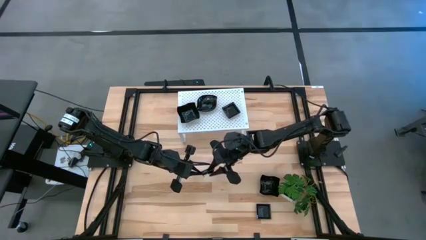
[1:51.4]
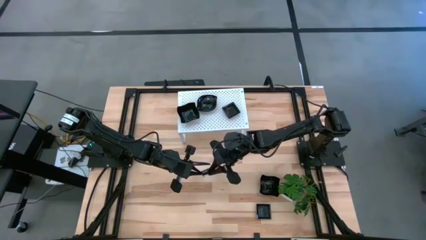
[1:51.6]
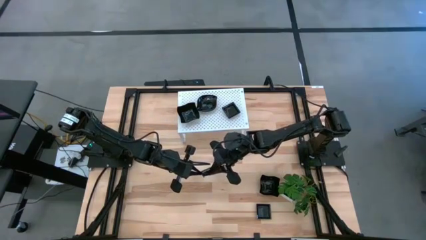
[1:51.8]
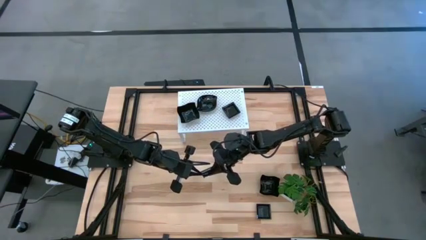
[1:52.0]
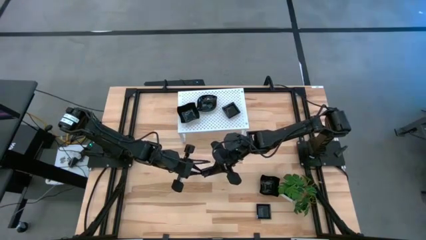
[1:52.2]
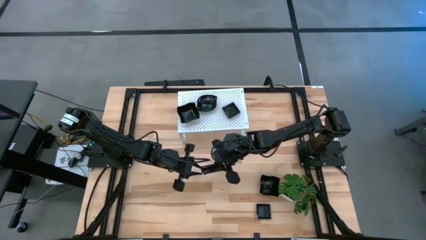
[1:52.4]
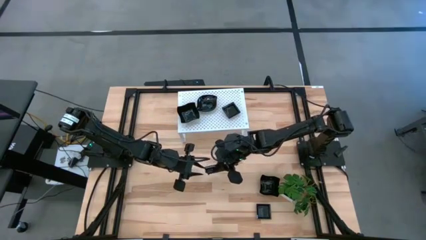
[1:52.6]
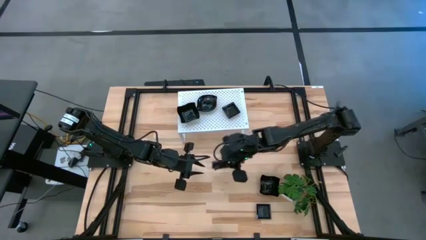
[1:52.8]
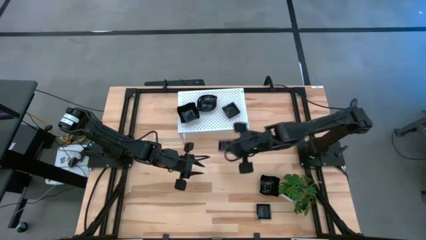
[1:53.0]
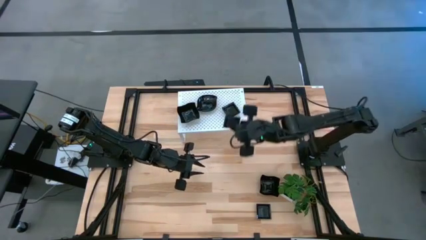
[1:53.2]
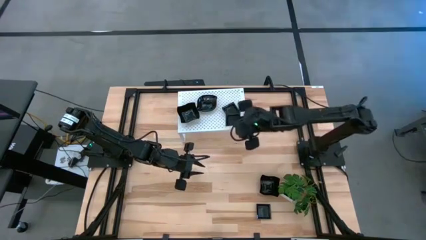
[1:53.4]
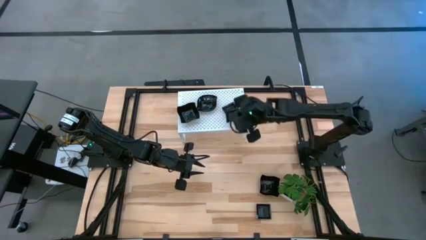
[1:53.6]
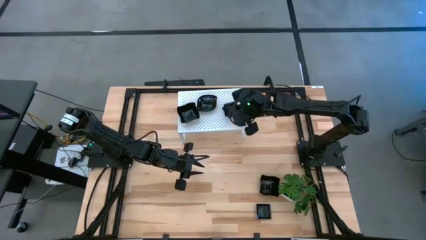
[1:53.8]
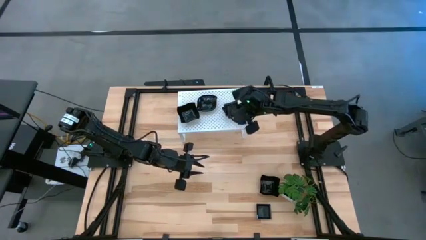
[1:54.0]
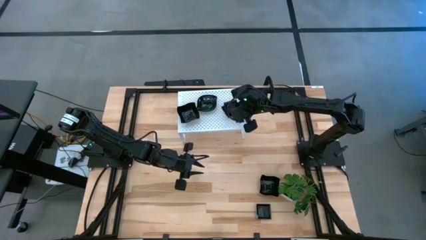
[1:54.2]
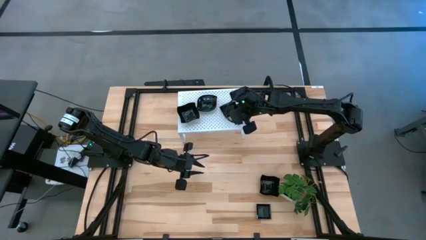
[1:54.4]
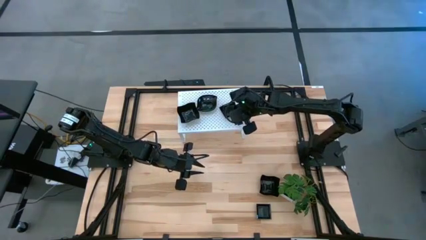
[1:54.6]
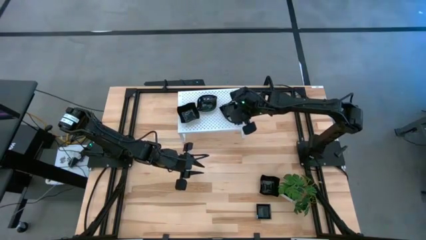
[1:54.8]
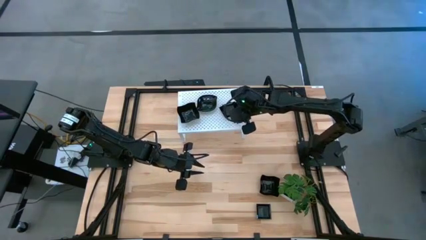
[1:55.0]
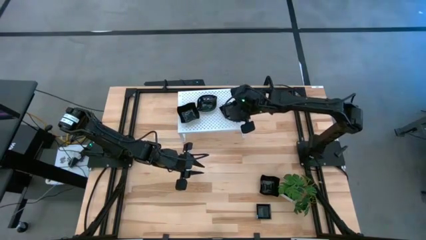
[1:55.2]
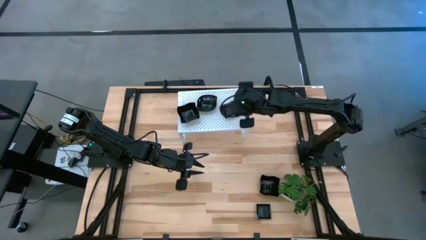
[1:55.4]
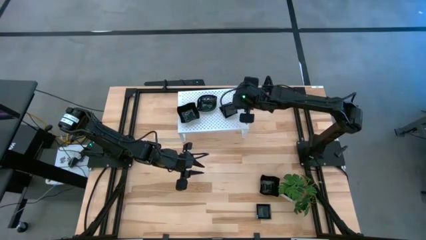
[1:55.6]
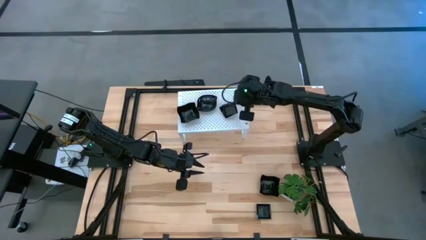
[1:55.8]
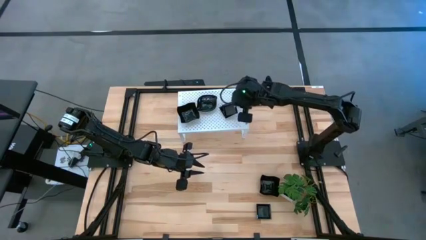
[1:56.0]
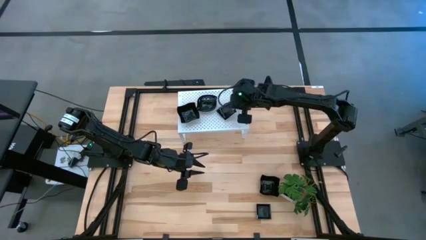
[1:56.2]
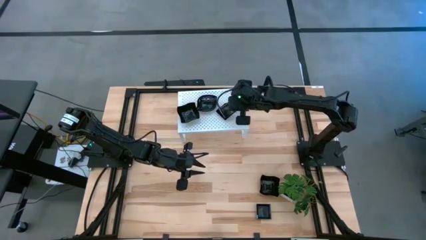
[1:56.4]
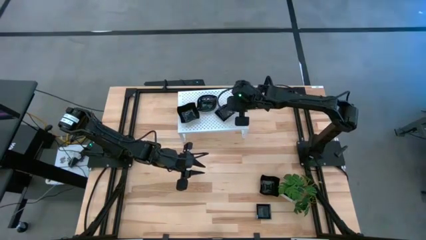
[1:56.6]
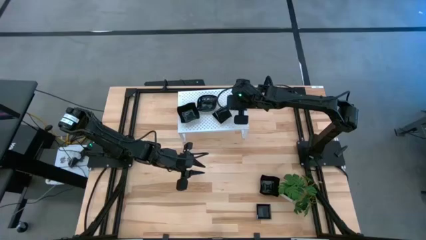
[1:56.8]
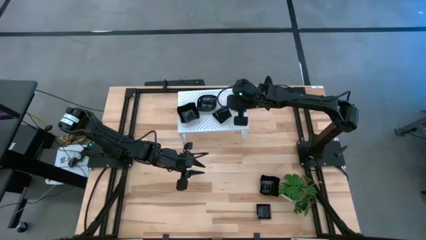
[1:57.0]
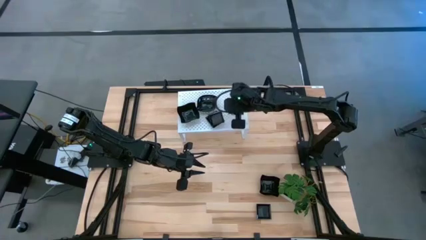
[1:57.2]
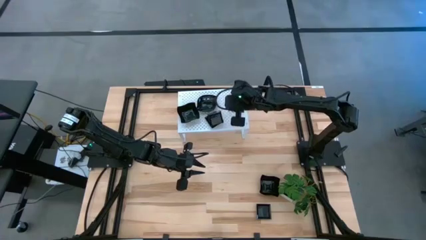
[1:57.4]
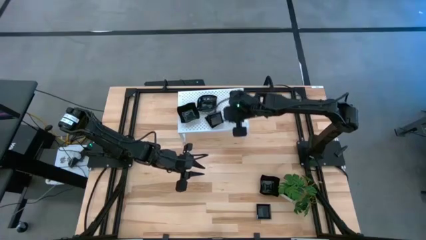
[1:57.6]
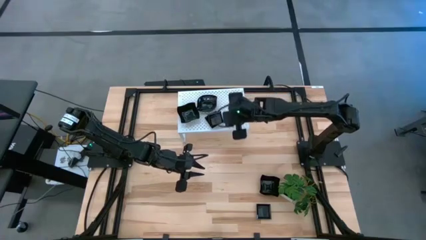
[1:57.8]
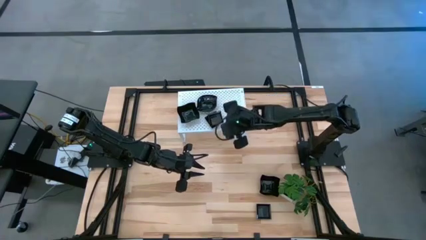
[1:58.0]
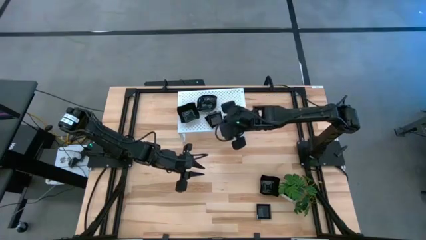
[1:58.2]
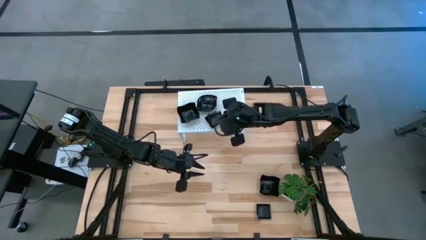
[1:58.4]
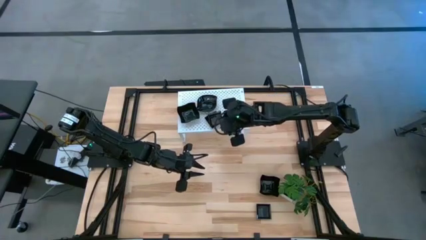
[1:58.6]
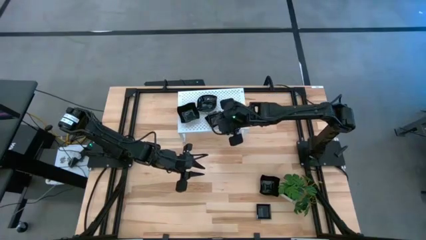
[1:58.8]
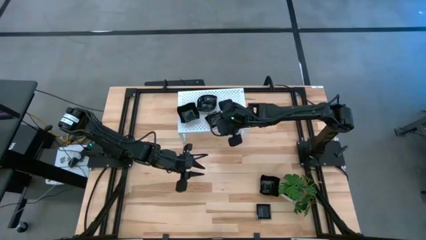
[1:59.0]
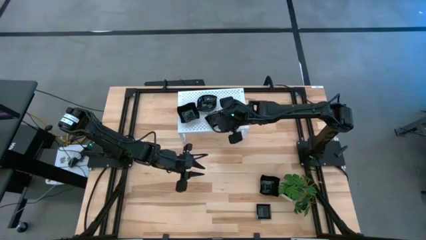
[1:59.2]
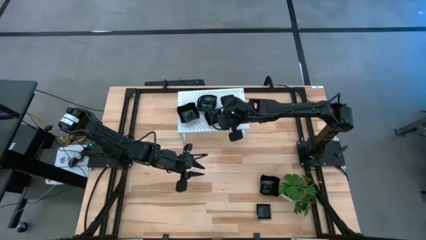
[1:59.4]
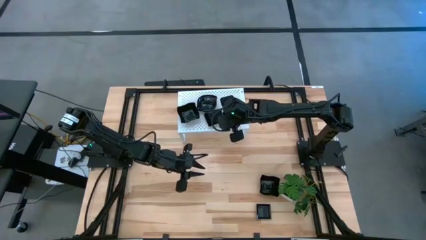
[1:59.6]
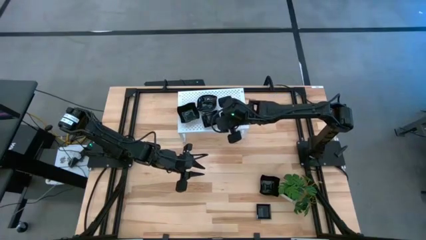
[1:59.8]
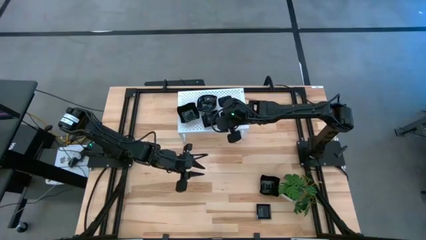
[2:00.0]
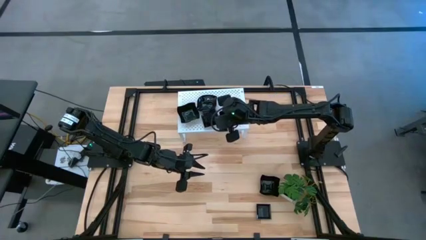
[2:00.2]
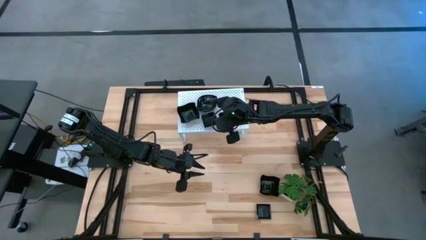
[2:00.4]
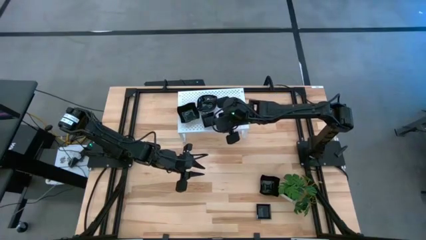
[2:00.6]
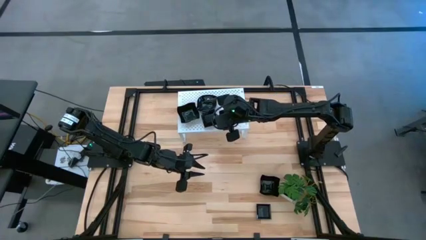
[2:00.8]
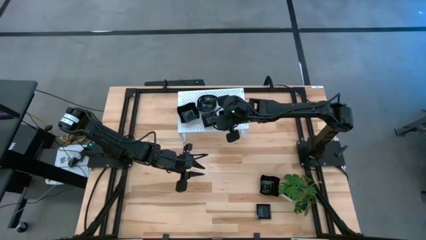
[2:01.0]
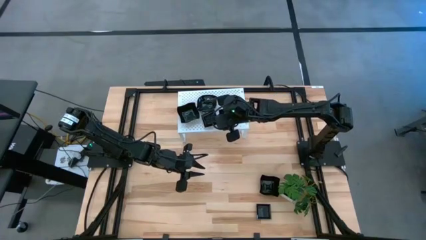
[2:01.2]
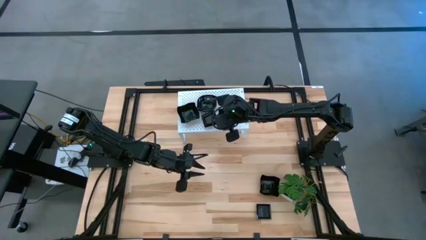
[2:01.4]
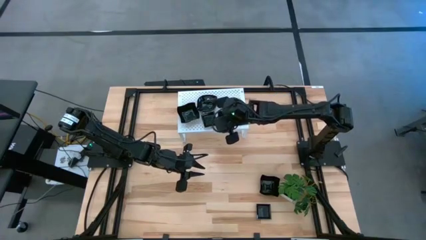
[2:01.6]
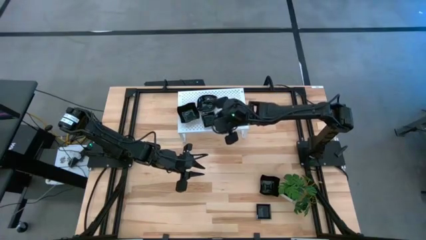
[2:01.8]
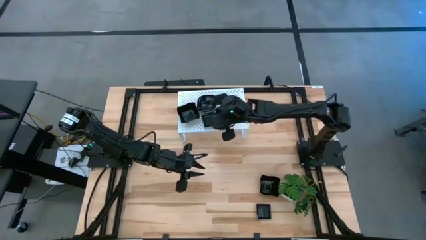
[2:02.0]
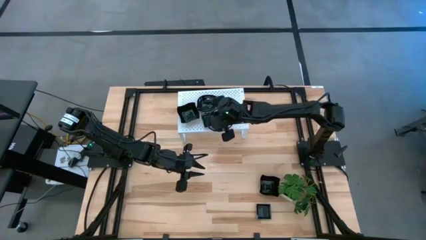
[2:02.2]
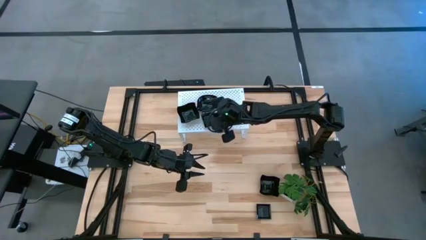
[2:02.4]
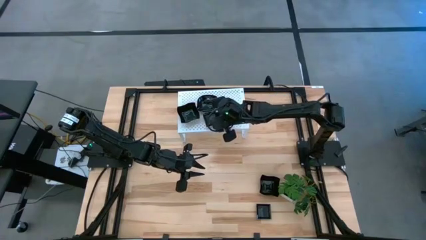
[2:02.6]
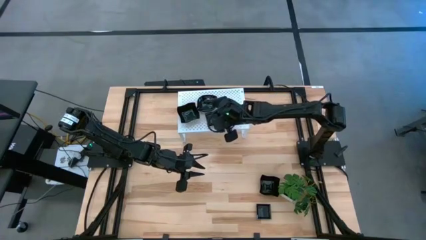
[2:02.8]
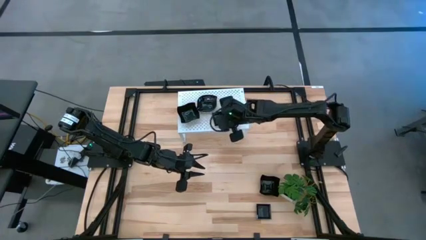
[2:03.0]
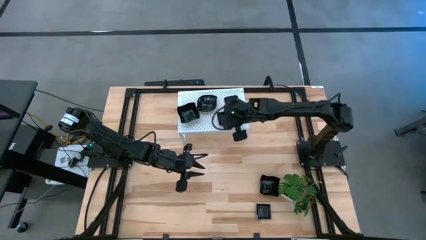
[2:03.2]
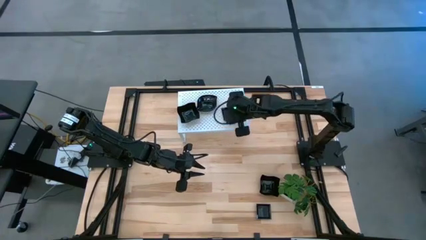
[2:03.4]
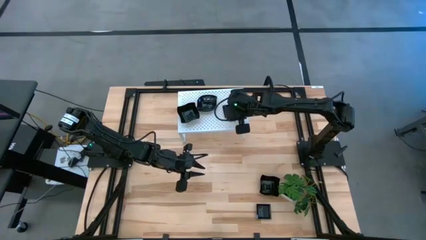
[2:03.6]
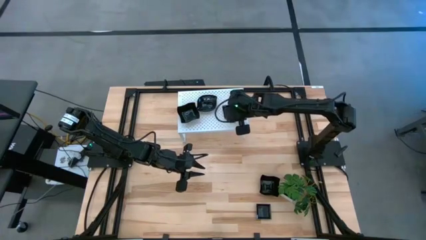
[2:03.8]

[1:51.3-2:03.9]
Task: Pick & Place Mini shaped plates
Stack the black square plate on top of the black square plate on the shelf

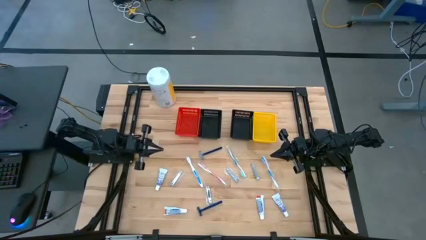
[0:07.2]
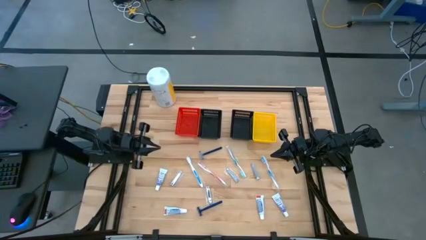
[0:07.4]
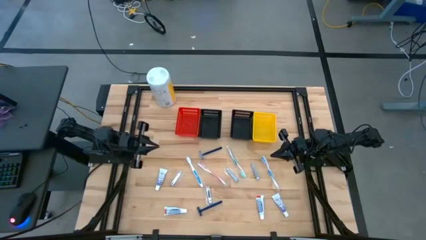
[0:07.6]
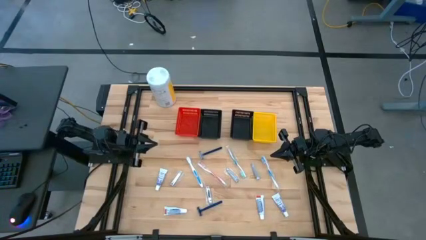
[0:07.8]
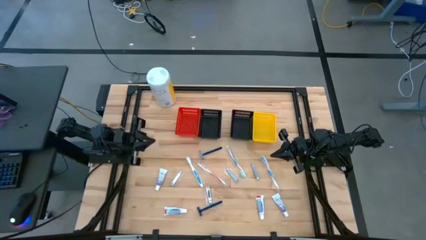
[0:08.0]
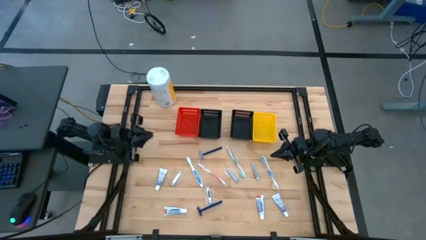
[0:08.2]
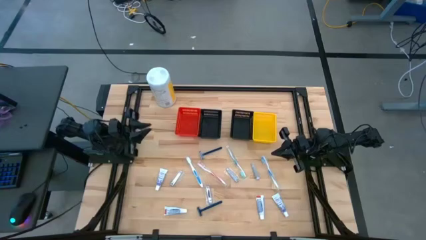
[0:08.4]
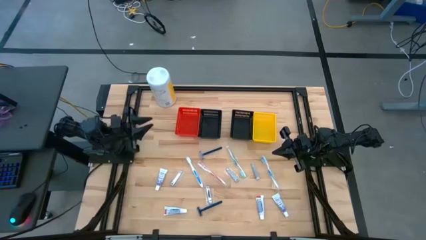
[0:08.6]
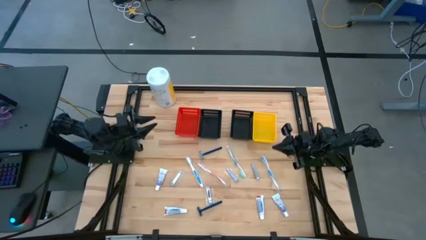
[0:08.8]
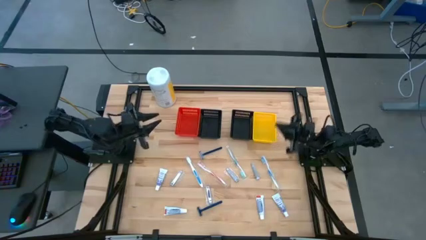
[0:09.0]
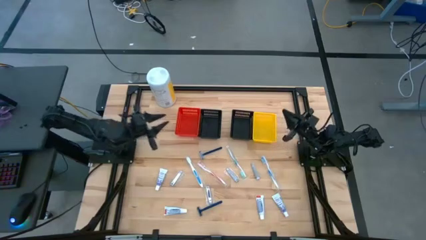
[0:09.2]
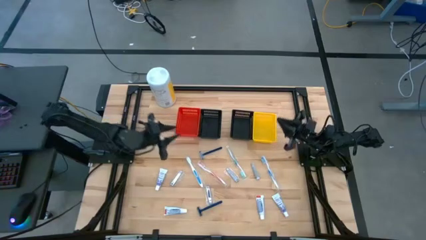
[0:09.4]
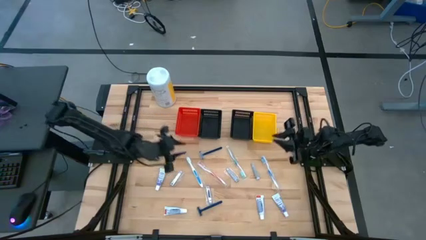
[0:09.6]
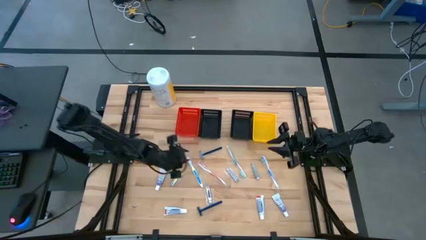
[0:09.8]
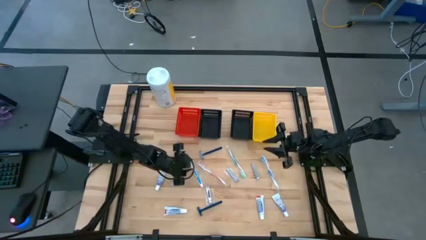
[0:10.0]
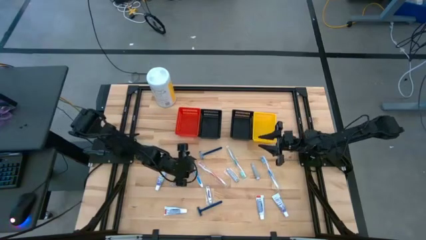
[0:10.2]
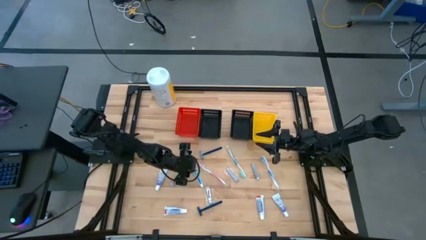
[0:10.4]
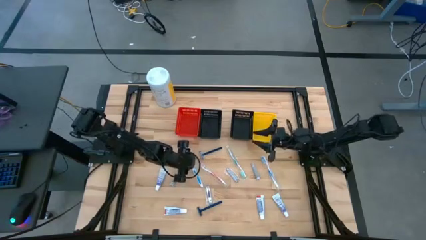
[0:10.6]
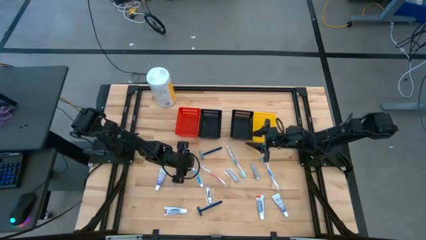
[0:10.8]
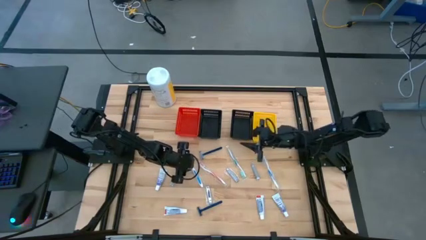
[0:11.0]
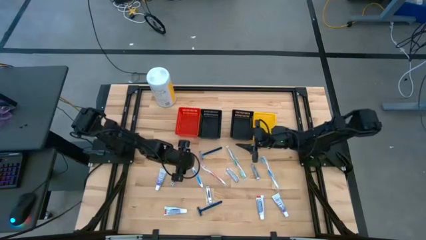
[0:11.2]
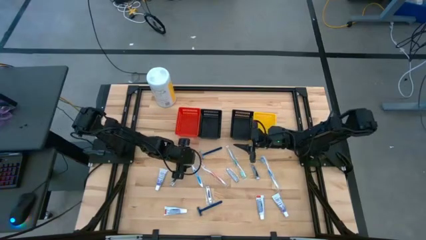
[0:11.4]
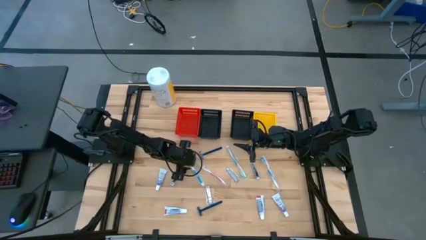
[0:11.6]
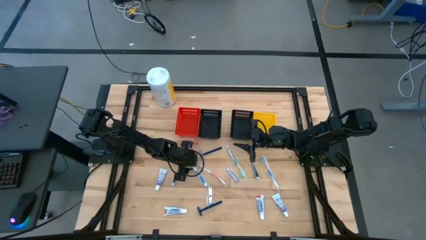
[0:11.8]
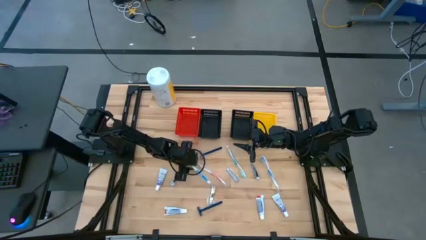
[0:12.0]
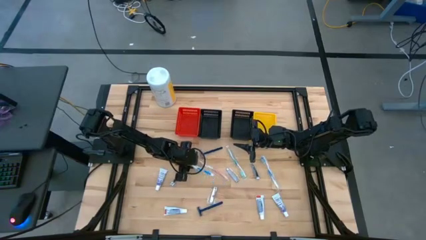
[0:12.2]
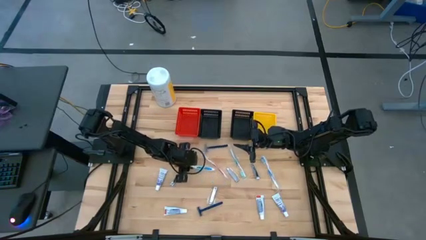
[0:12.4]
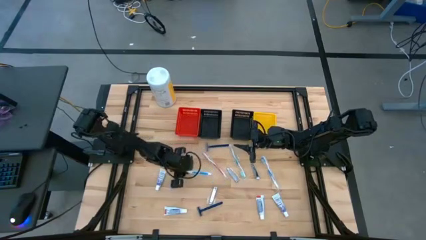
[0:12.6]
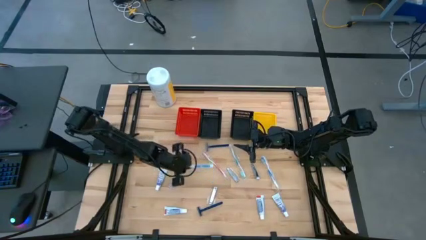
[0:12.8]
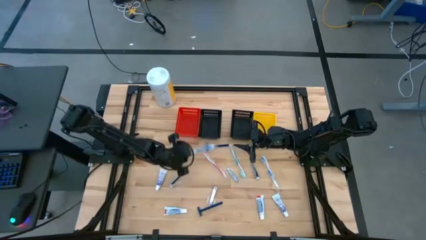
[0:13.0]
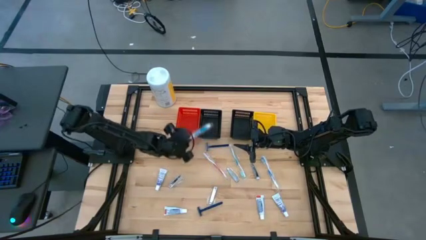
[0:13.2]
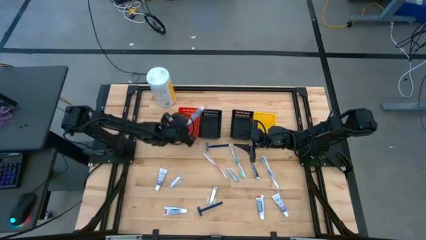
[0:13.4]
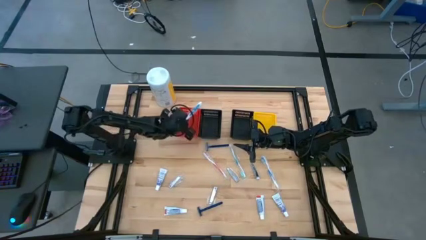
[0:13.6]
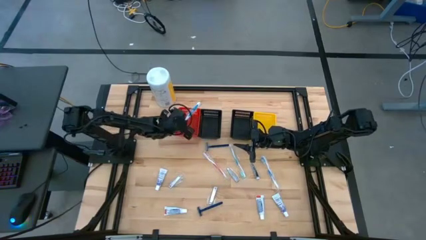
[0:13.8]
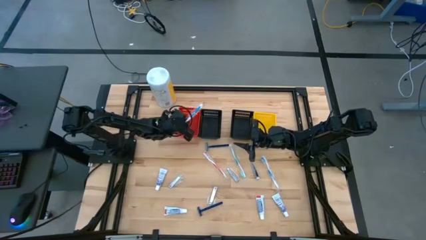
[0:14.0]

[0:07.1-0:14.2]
Task: Pick & Place Travel size toiletries
Put the blue toothbrush into the red basket
